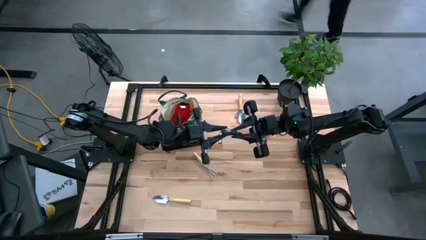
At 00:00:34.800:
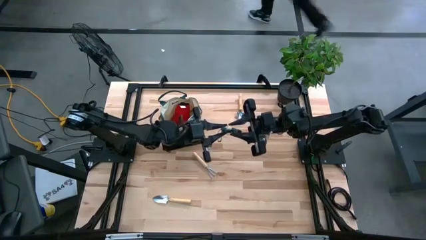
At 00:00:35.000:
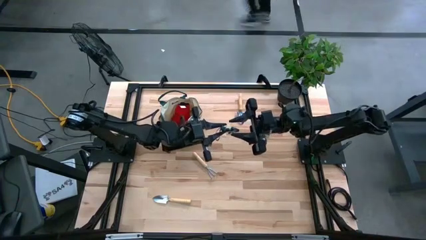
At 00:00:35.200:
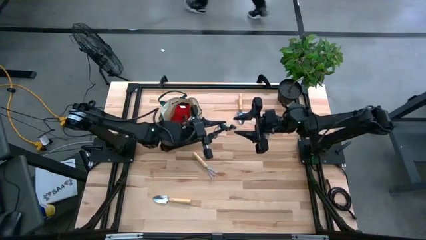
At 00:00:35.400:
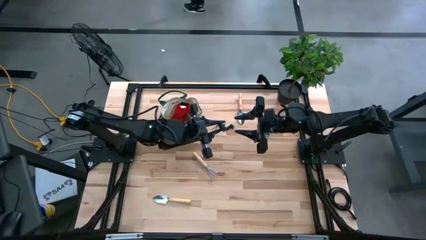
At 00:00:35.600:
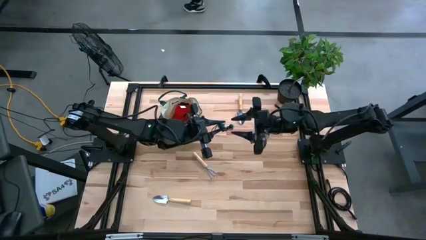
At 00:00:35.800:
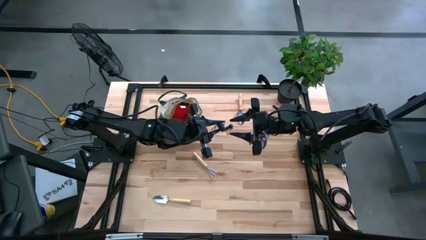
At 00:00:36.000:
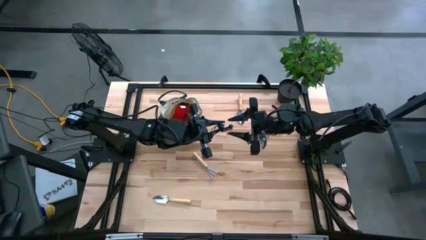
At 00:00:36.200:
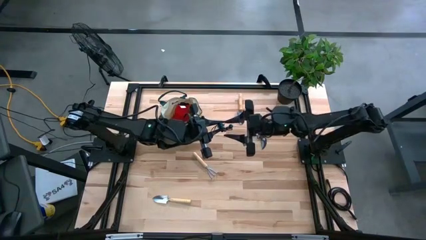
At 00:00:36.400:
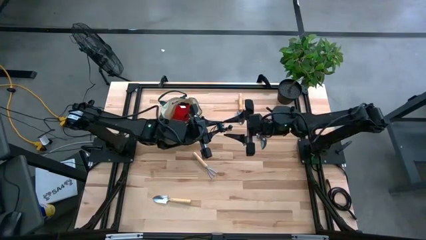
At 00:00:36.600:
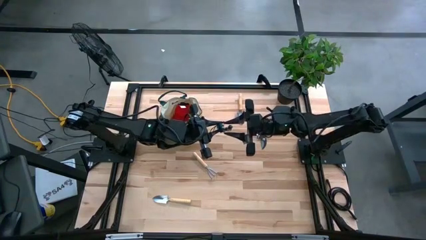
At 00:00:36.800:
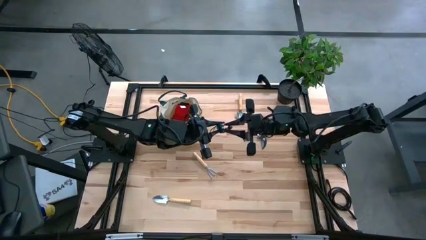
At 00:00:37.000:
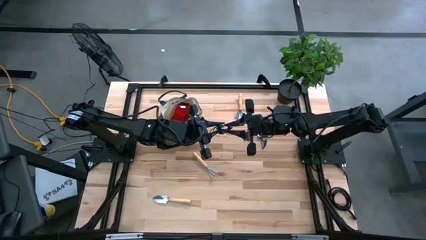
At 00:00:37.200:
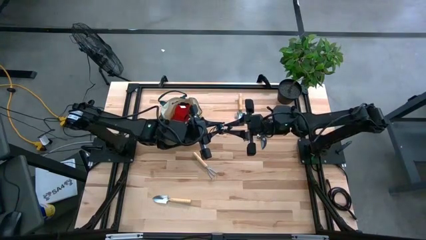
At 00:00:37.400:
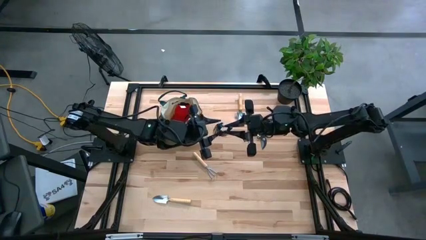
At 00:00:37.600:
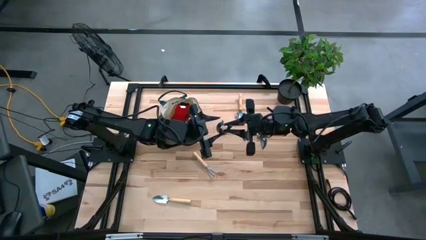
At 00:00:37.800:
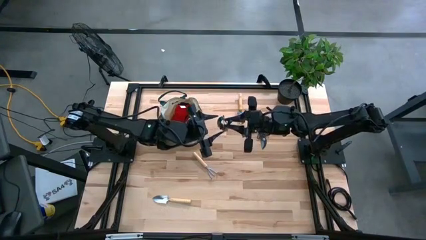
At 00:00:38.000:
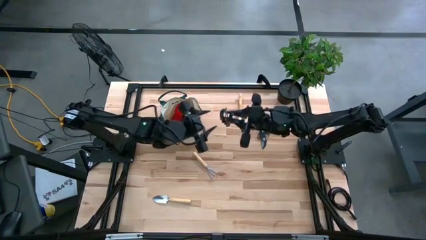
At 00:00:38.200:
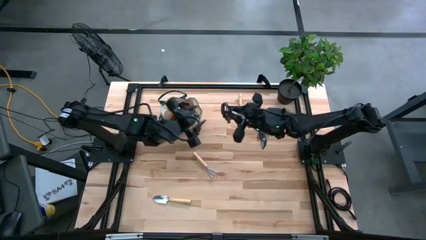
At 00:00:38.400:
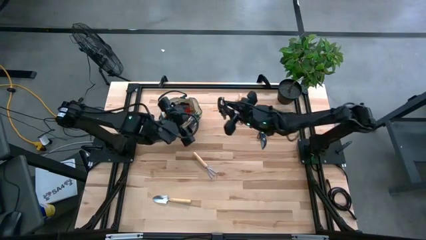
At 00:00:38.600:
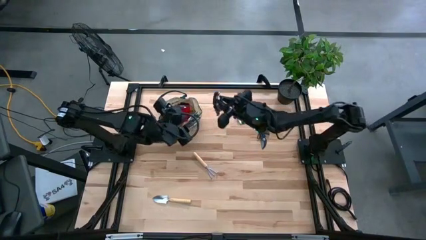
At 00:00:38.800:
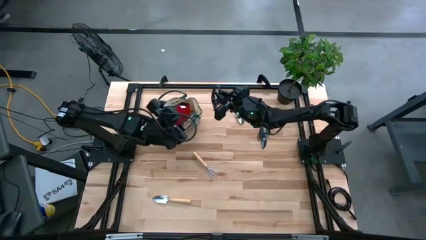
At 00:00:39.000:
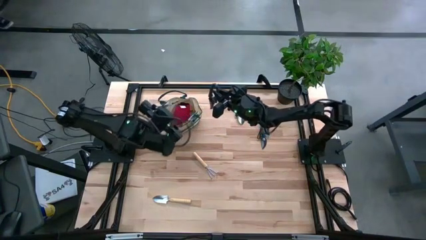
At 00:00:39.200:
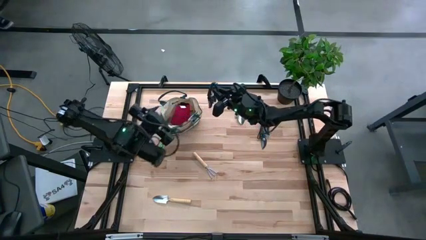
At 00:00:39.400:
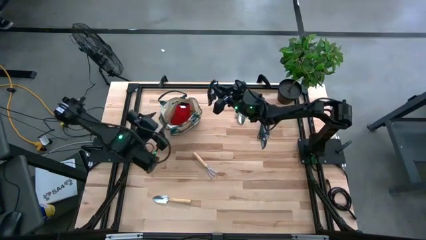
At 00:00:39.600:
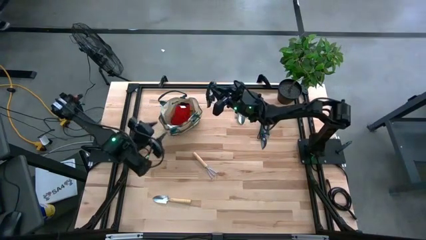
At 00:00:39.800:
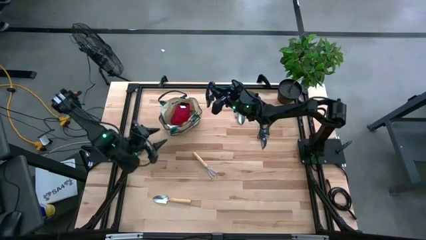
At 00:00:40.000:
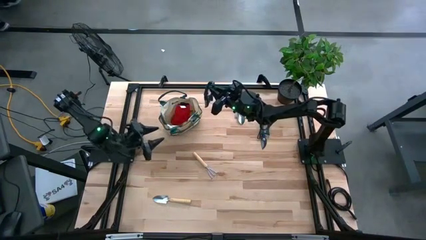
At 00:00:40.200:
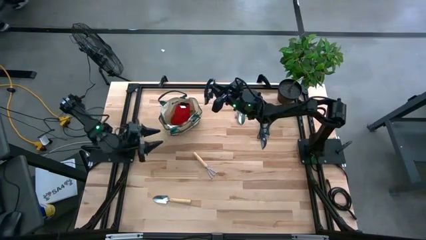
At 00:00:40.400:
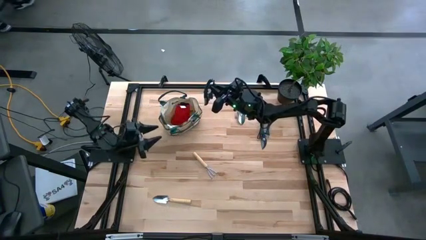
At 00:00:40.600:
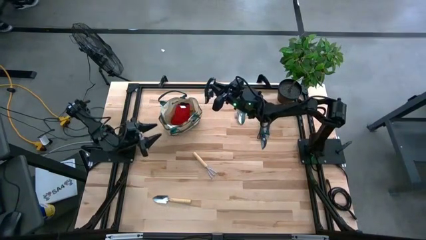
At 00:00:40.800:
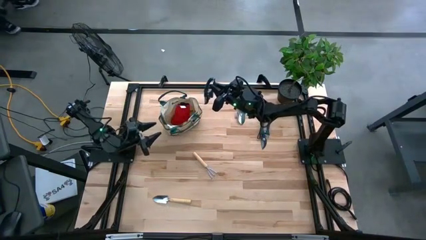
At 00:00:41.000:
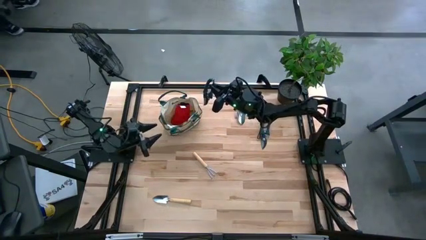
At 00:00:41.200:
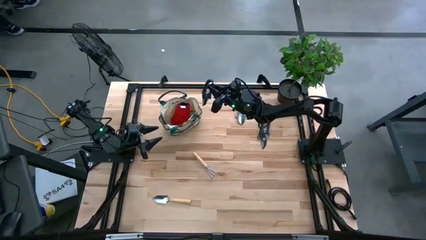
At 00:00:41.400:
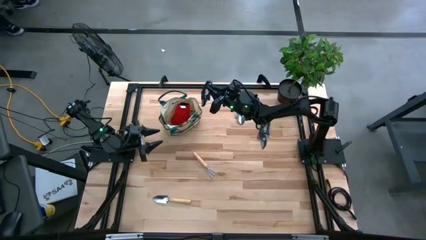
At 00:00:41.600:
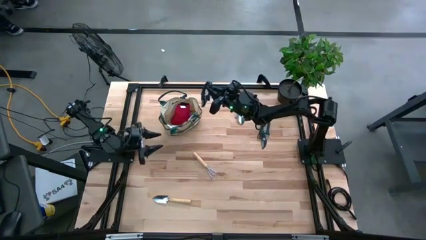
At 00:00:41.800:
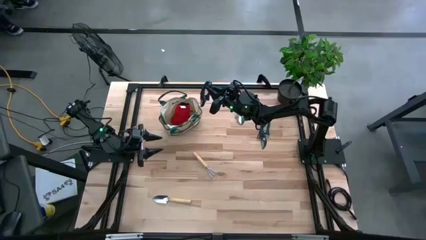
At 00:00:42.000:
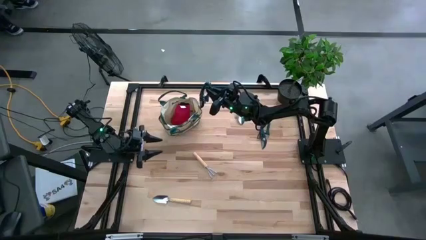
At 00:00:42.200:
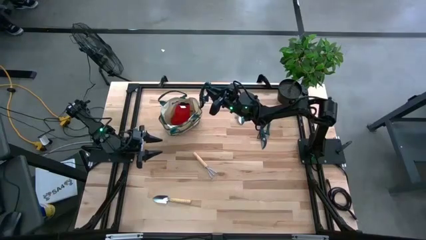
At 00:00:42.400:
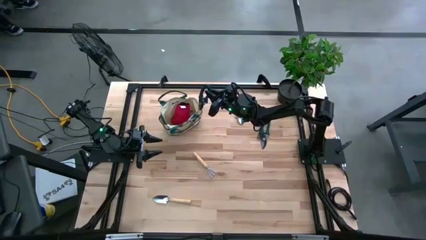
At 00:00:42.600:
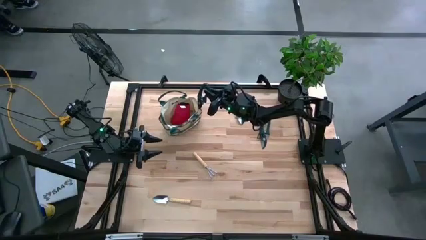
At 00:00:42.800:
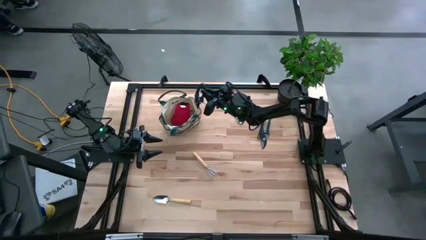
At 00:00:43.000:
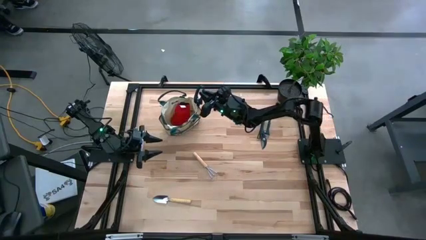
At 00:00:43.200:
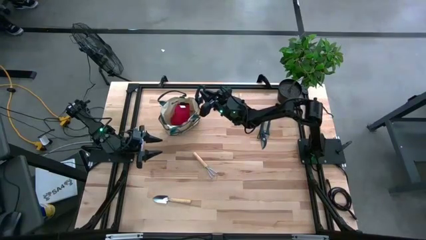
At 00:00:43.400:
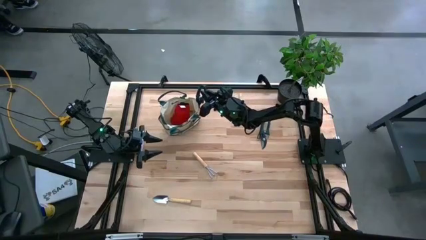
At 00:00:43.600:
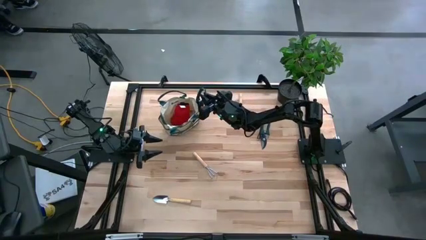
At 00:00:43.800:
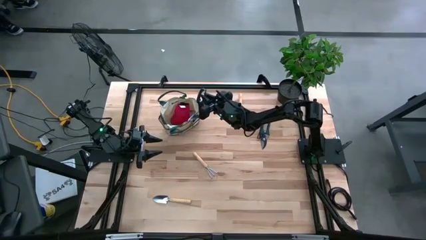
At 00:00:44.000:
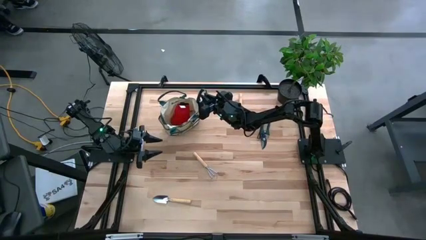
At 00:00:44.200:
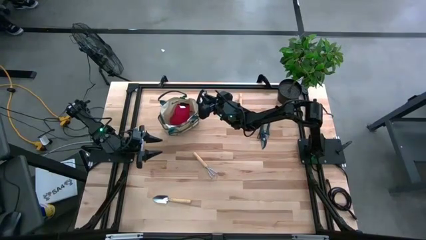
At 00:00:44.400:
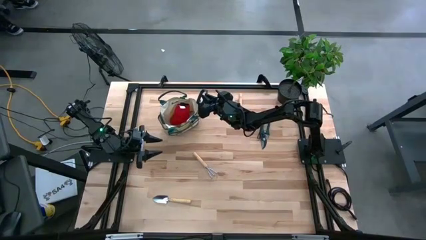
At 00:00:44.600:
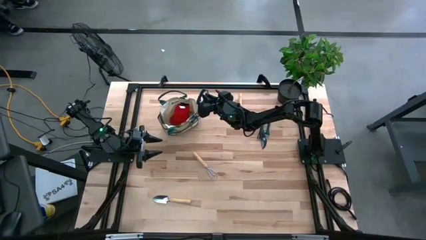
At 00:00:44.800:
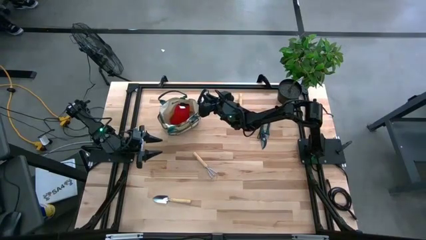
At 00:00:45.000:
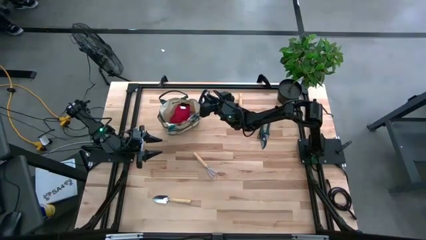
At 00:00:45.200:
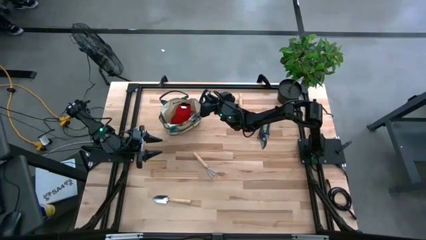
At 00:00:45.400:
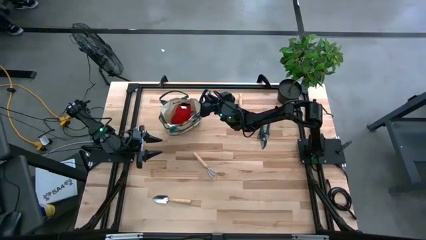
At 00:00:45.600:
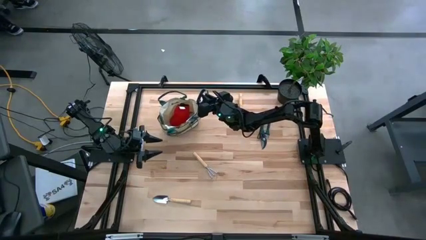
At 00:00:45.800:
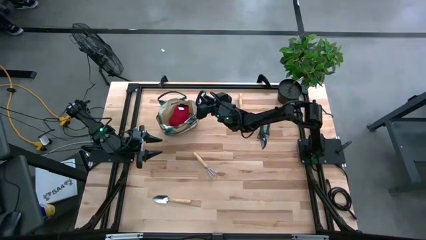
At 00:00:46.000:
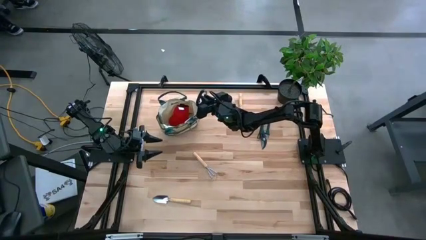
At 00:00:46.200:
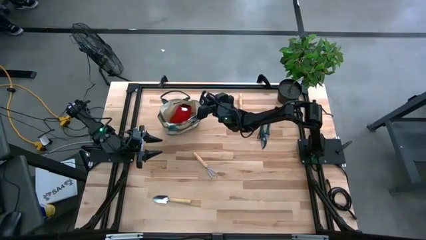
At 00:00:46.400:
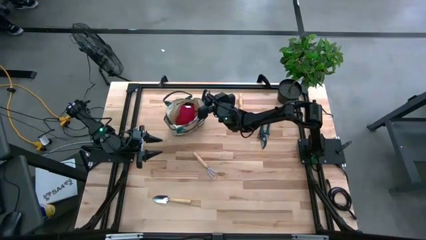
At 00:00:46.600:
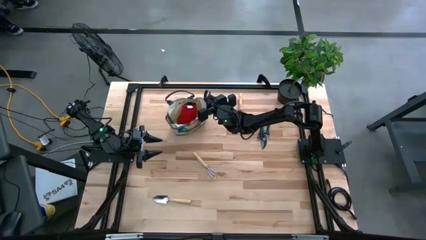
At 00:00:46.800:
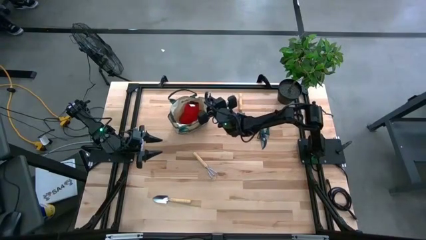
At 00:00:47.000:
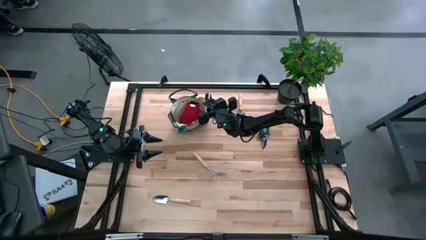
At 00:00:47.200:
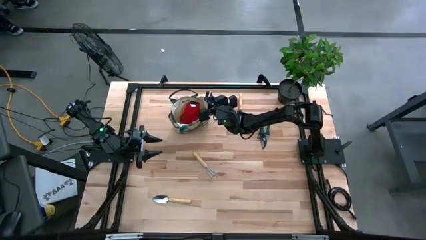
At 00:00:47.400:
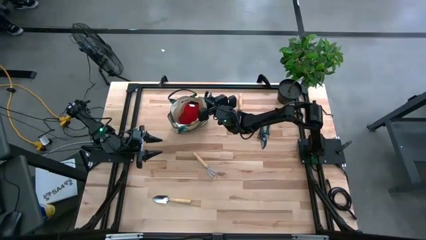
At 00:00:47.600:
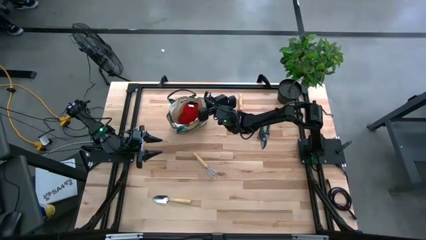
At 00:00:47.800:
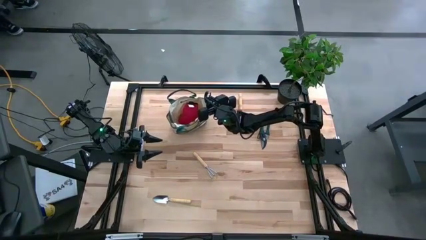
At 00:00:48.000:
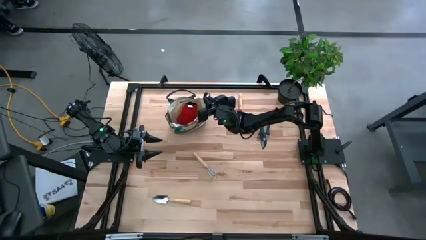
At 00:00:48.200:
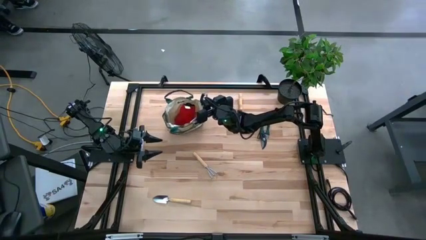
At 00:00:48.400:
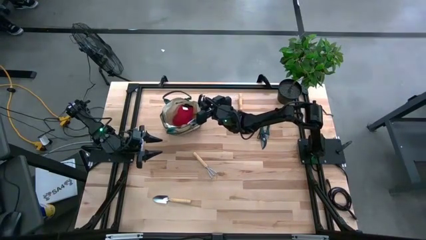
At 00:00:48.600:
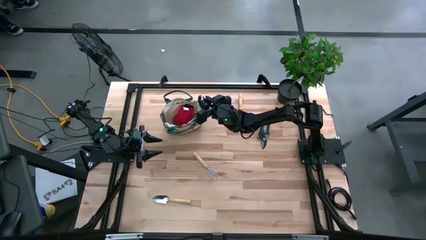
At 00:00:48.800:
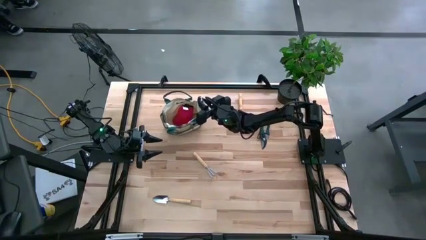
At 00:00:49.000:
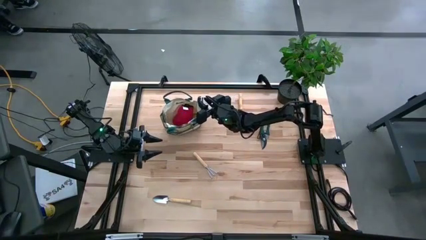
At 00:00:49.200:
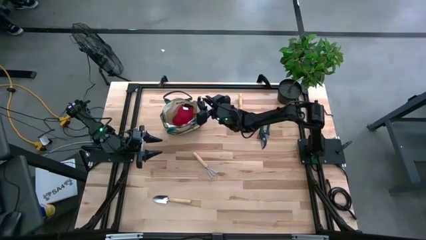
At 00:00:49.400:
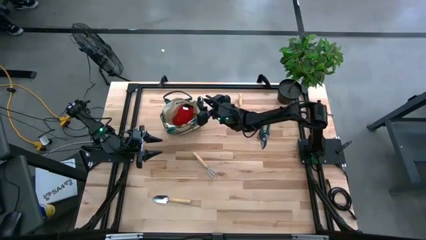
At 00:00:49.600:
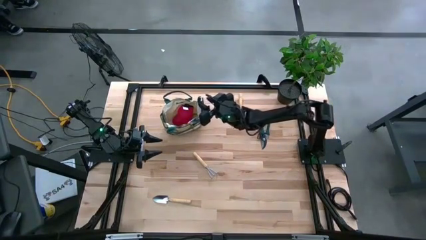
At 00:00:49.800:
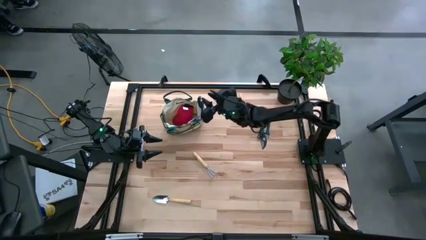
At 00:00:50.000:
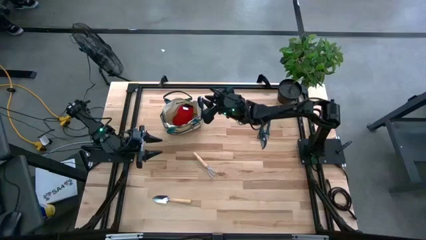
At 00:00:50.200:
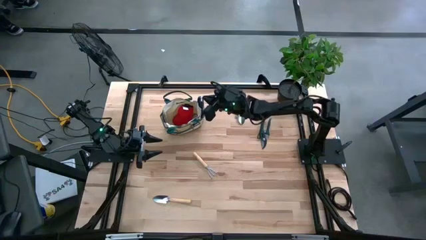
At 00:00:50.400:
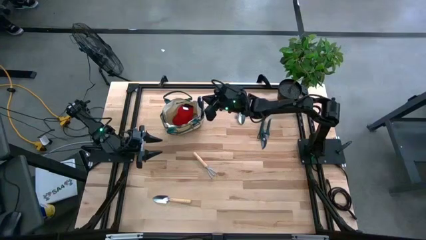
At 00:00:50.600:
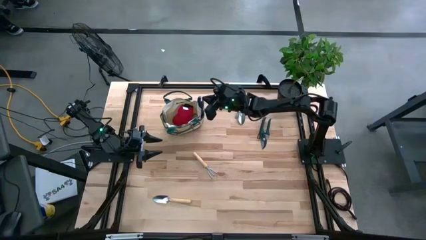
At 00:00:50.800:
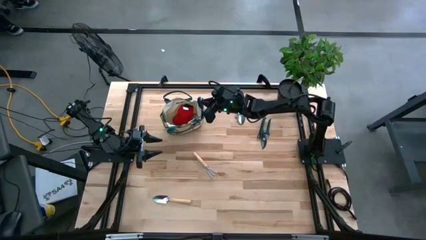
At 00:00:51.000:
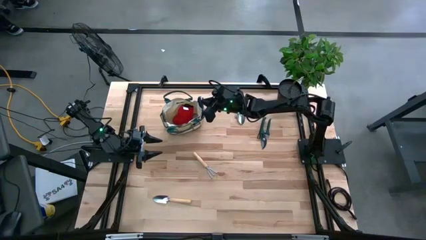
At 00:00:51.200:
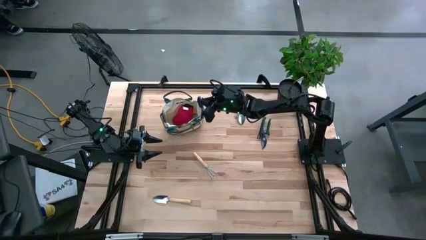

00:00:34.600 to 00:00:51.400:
Task: Pick & Place Garden tools in Gardening bag
Put the green shears into the gardening bag
